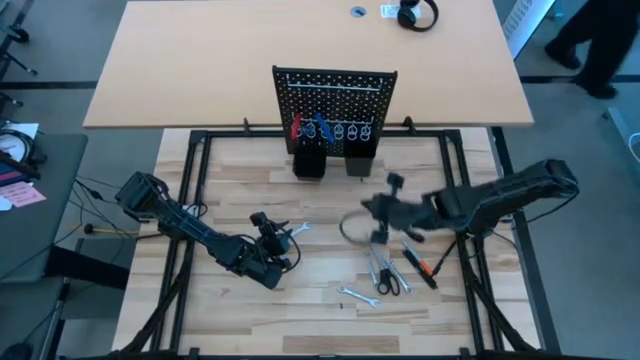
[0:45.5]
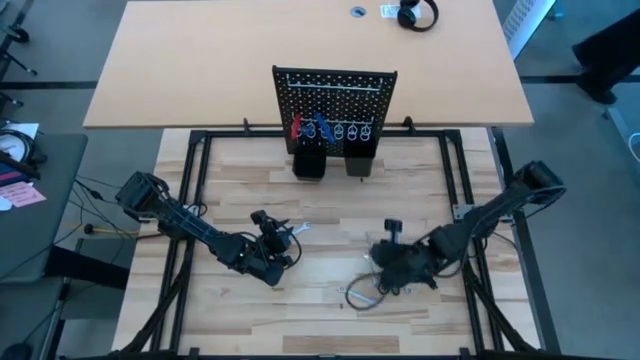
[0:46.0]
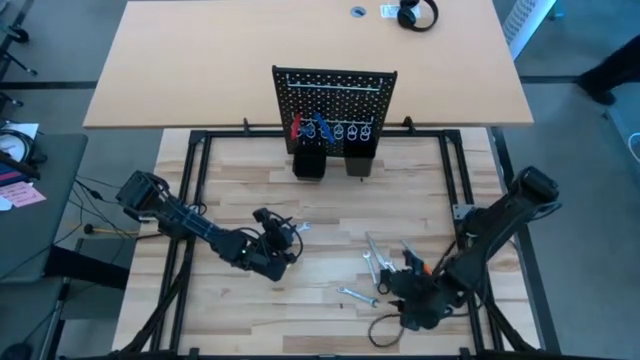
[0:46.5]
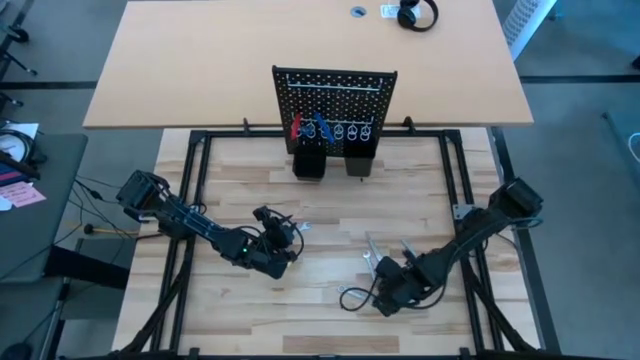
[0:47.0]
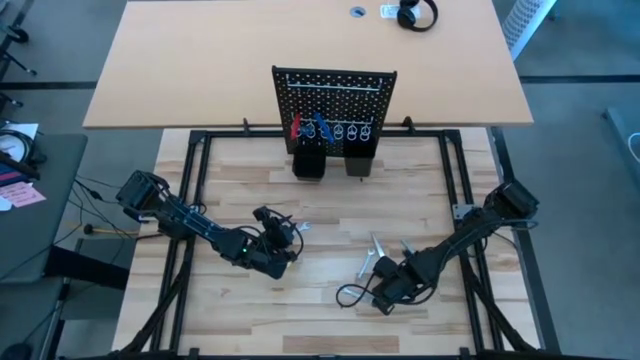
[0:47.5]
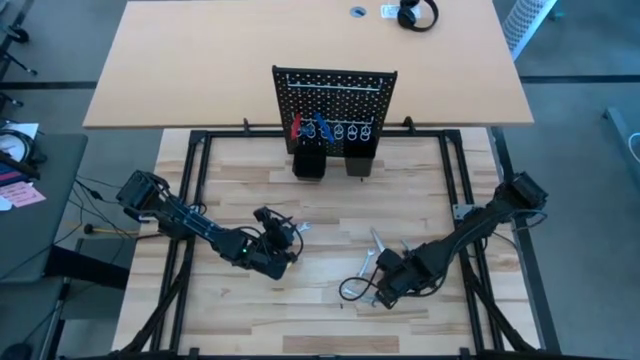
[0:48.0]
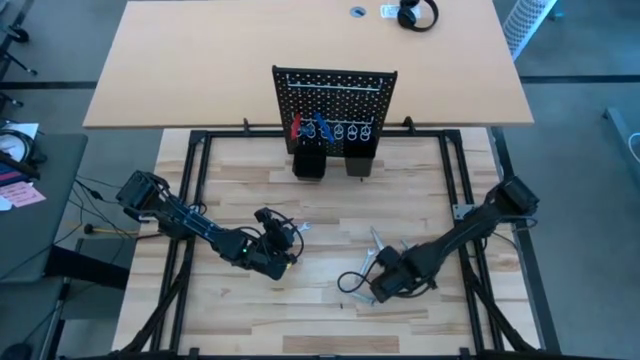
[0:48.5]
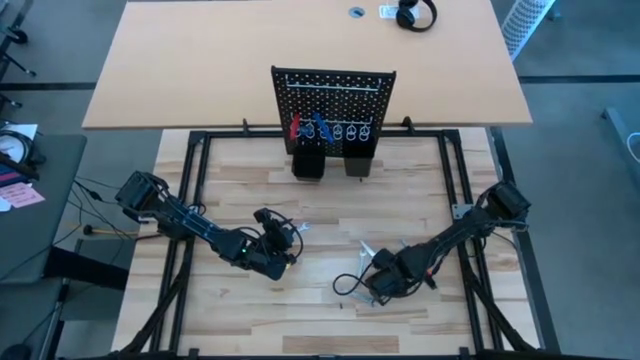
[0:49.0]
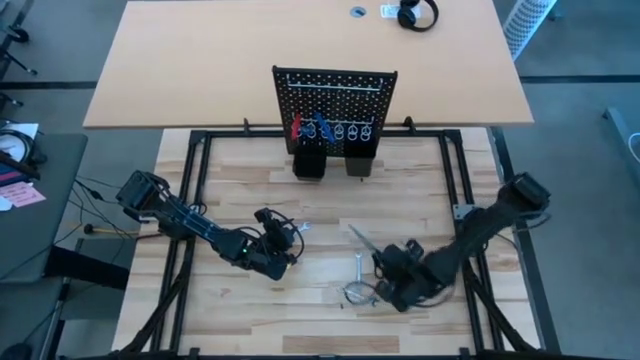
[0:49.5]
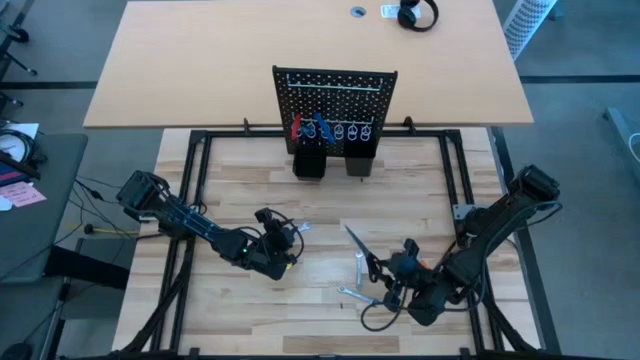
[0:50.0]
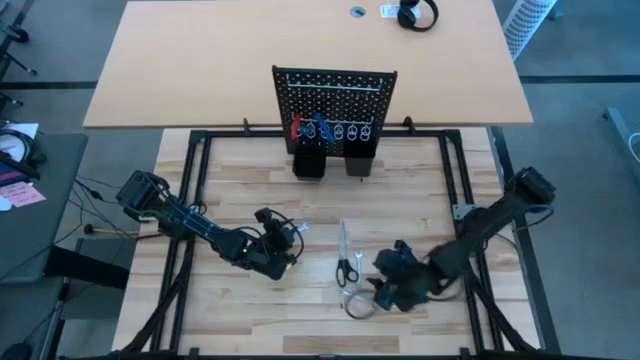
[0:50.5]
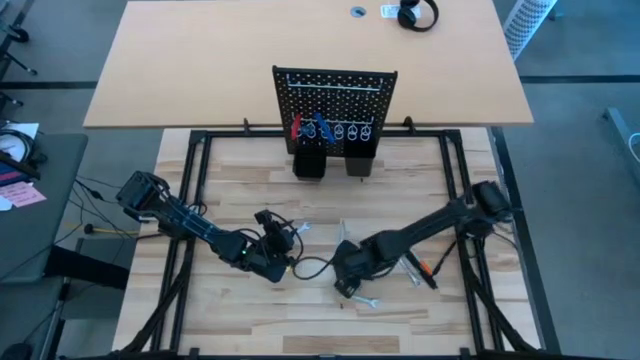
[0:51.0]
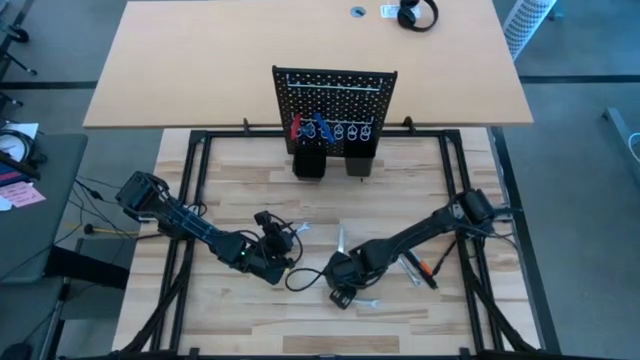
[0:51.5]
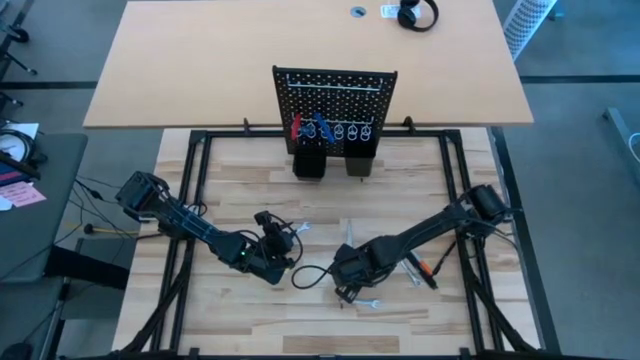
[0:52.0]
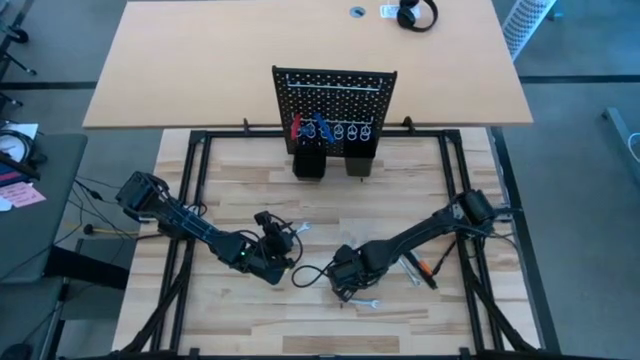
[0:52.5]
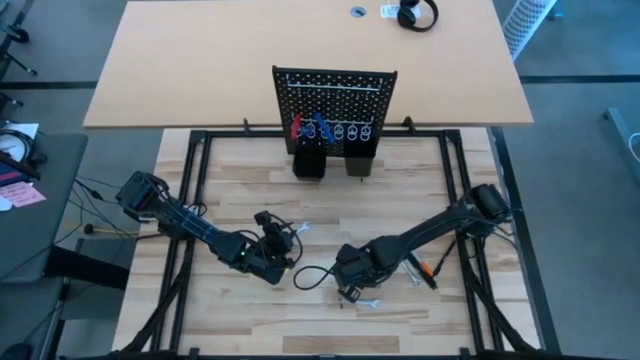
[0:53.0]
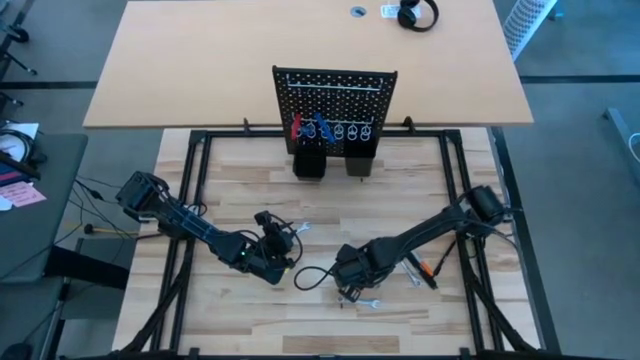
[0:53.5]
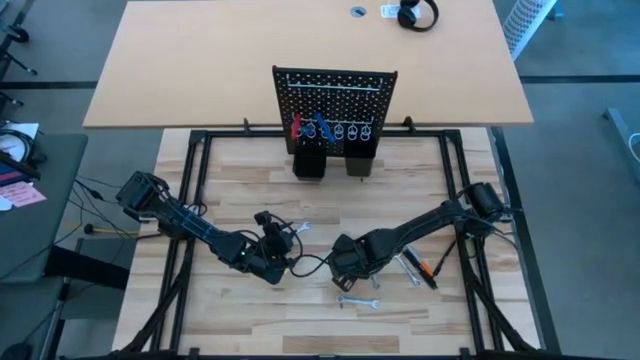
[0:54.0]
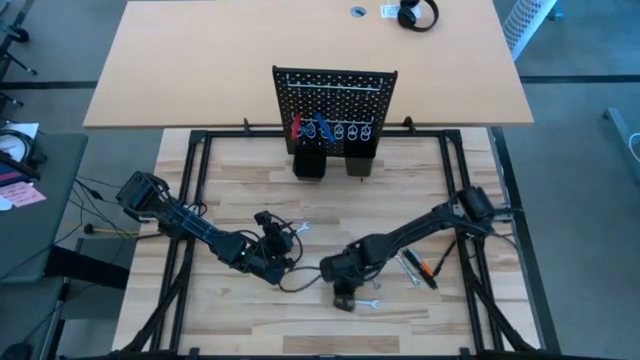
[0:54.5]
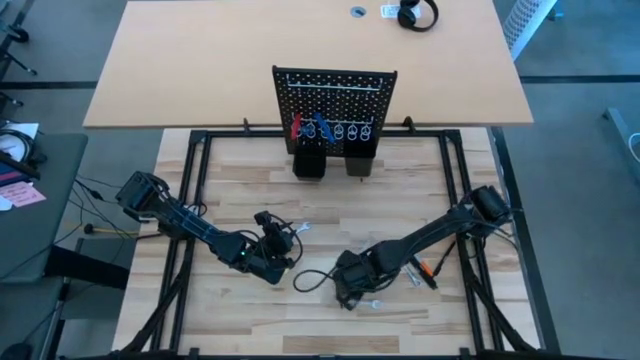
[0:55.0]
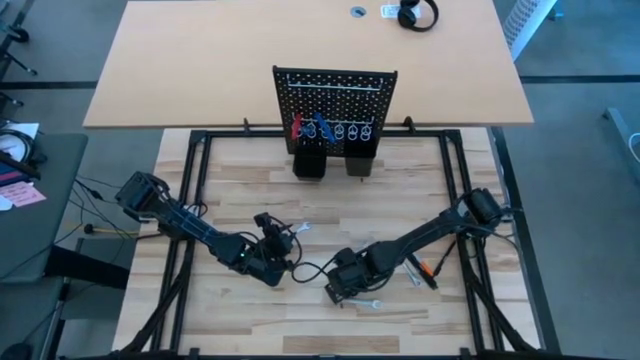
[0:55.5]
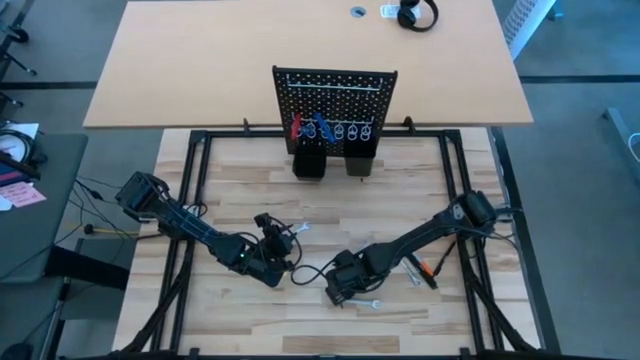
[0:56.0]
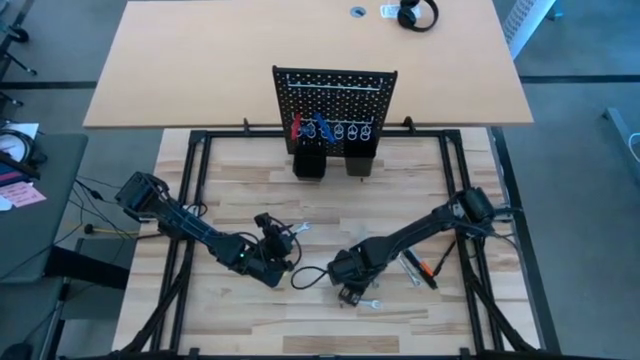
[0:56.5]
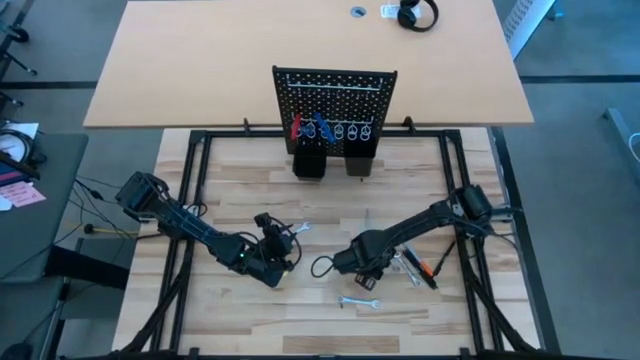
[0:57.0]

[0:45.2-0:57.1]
Task: Hang tools onto peg board
Hang the black scissors on the pegboard

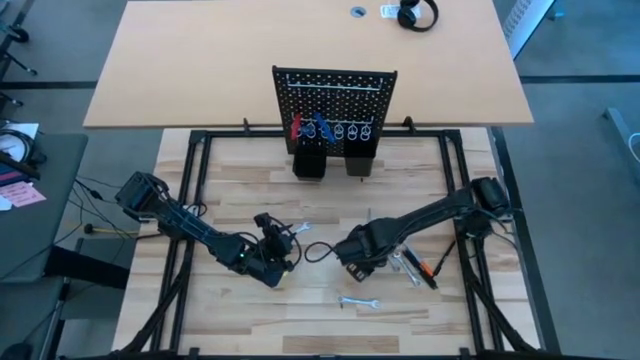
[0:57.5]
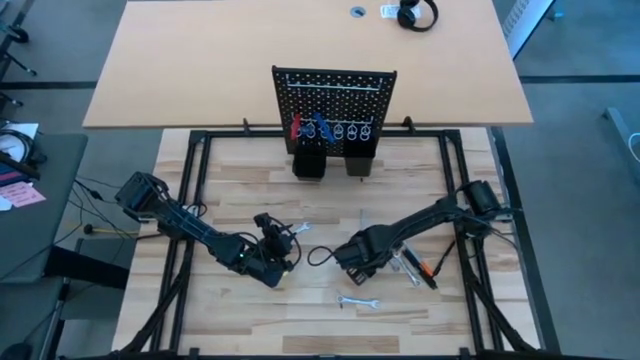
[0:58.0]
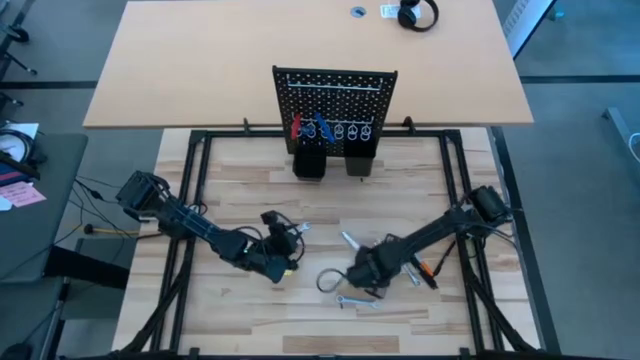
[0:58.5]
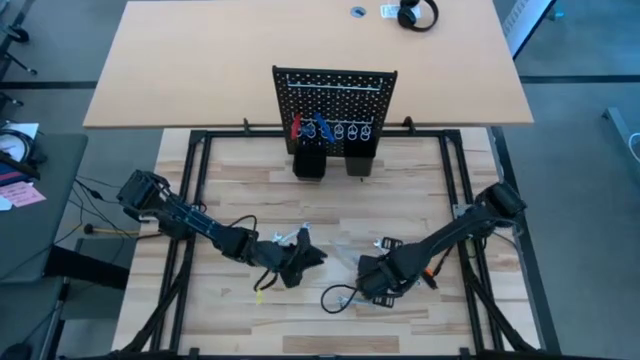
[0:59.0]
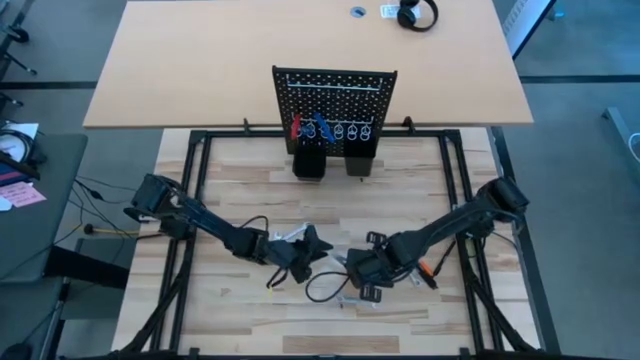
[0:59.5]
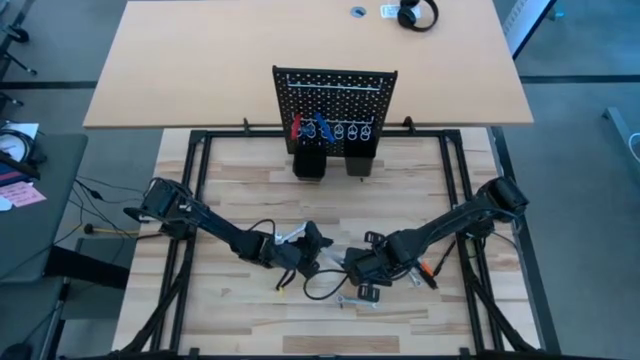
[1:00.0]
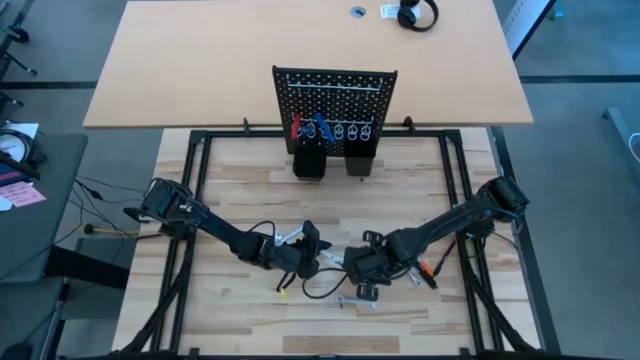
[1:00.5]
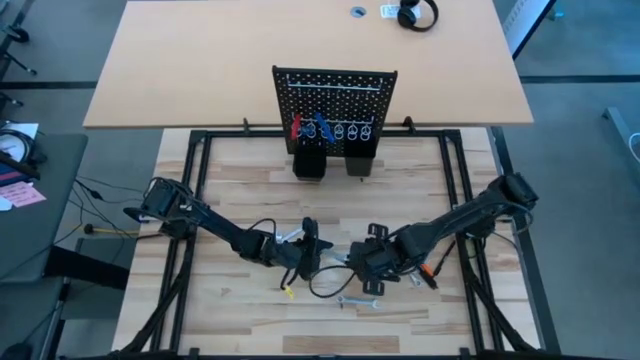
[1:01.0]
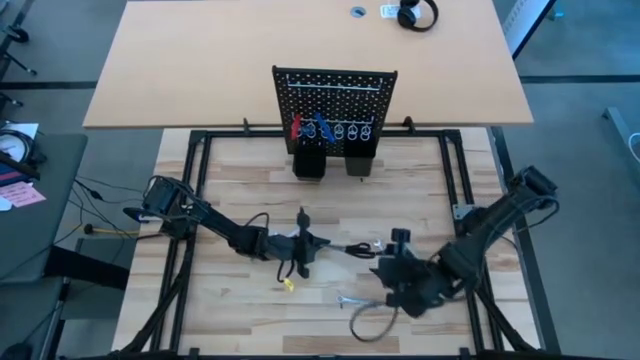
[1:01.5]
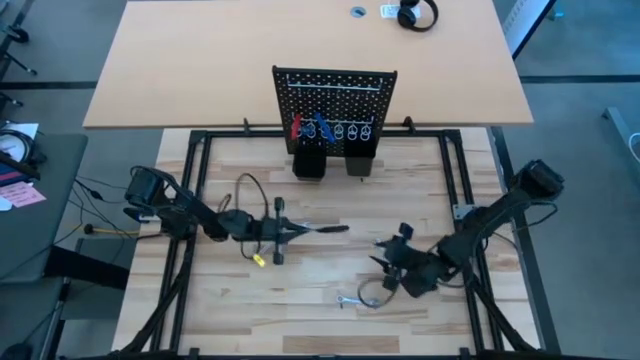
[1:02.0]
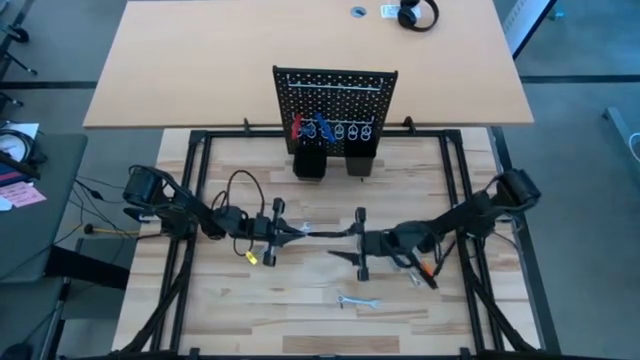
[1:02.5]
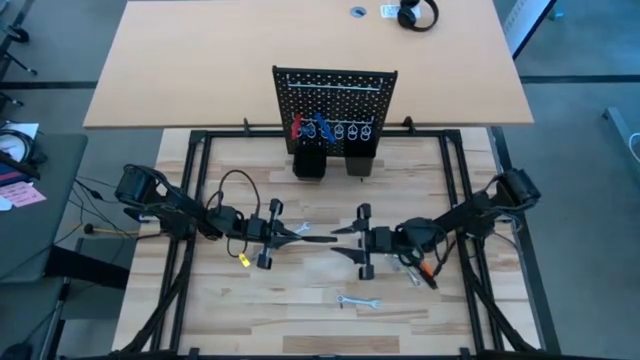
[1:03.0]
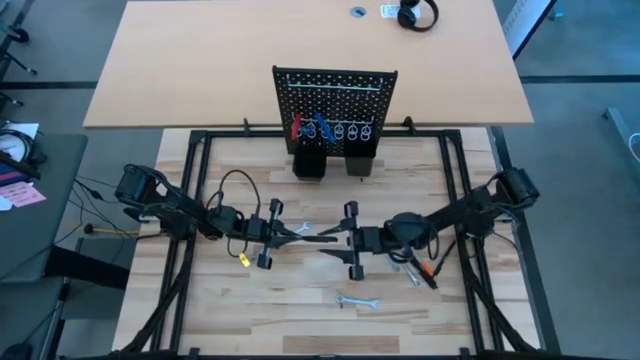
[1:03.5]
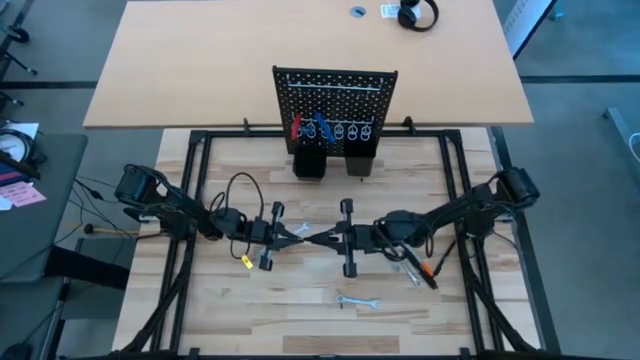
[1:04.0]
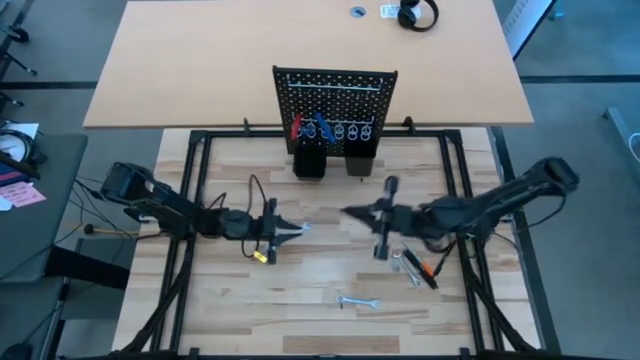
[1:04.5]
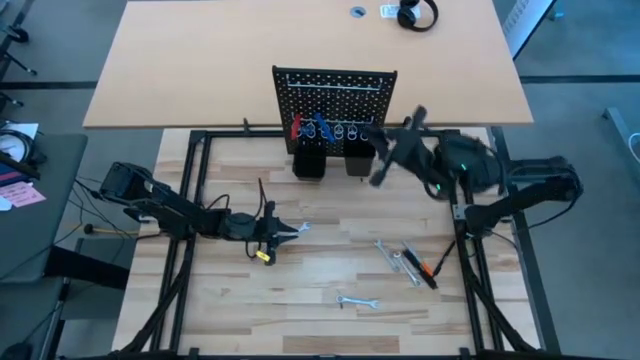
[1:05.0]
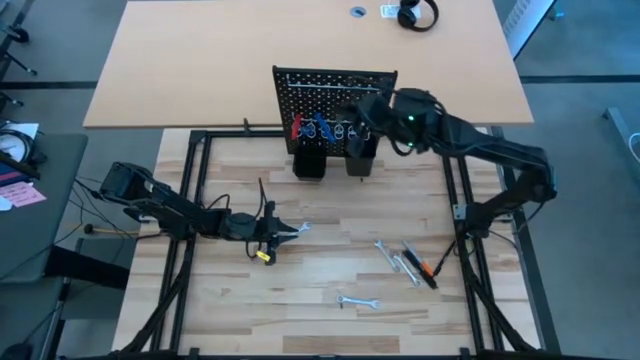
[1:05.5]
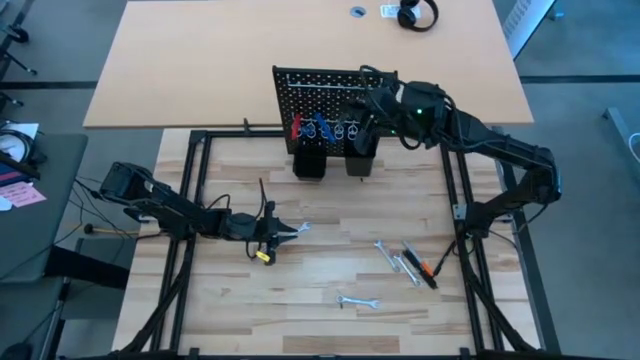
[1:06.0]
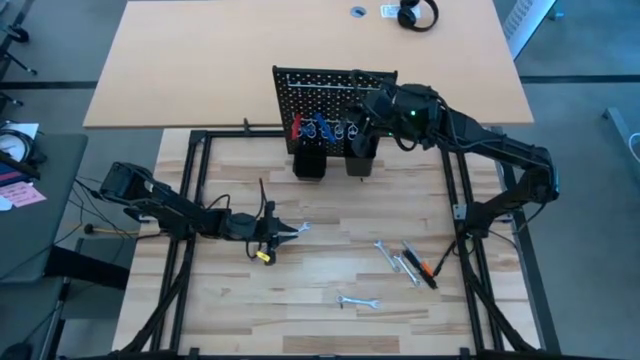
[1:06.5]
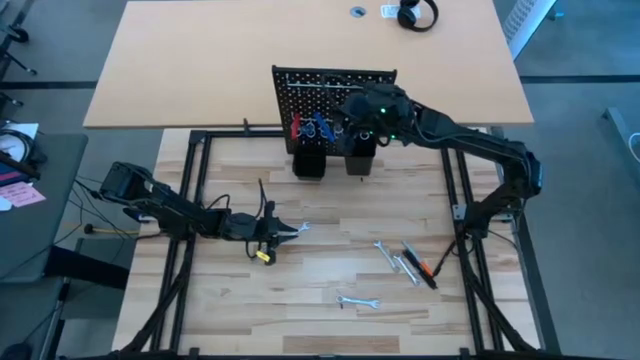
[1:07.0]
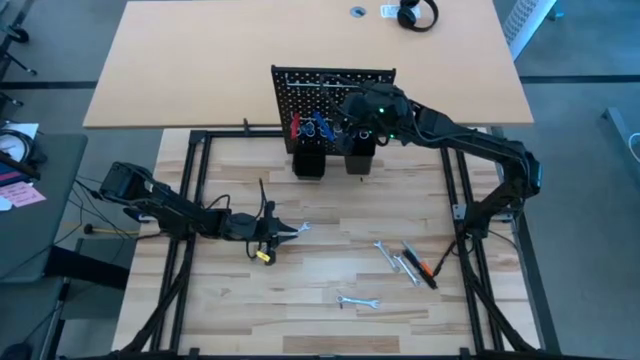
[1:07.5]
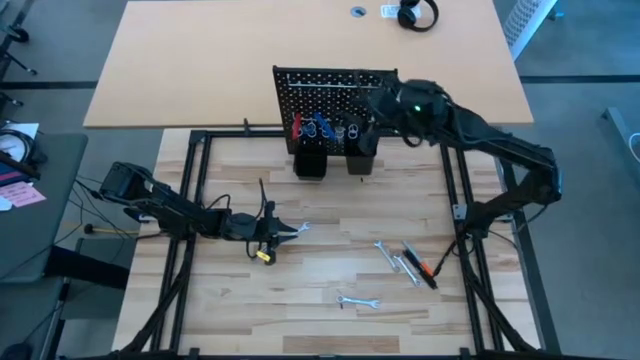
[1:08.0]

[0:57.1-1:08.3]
Hang the black scissors on the pegboard
